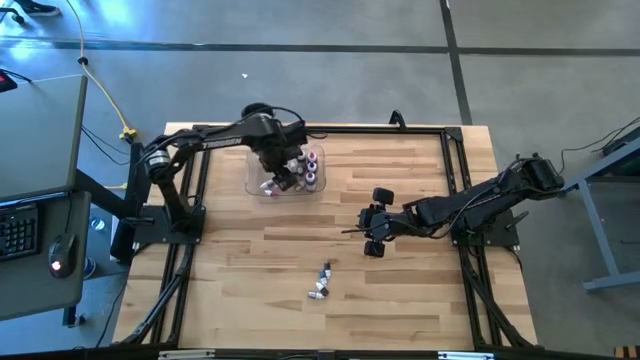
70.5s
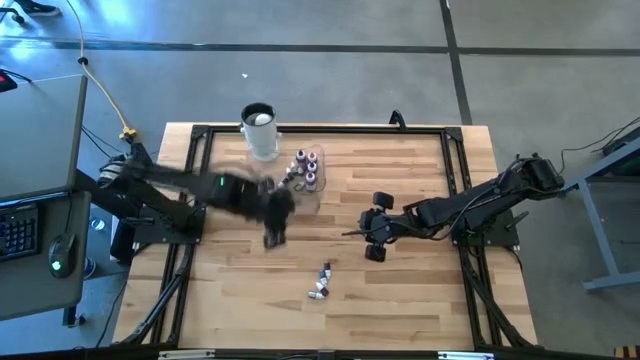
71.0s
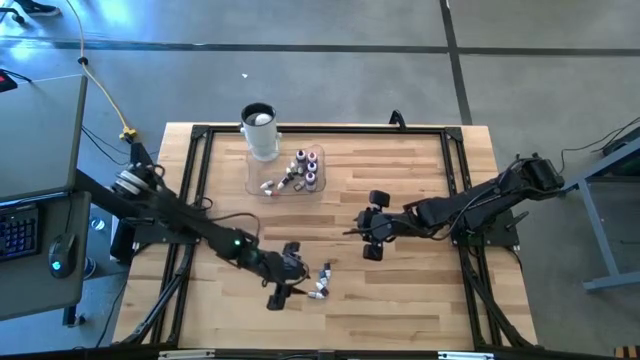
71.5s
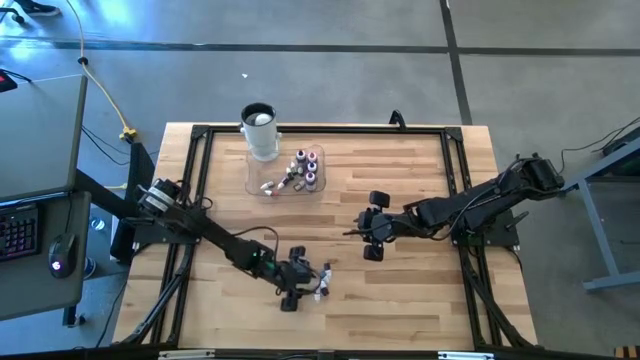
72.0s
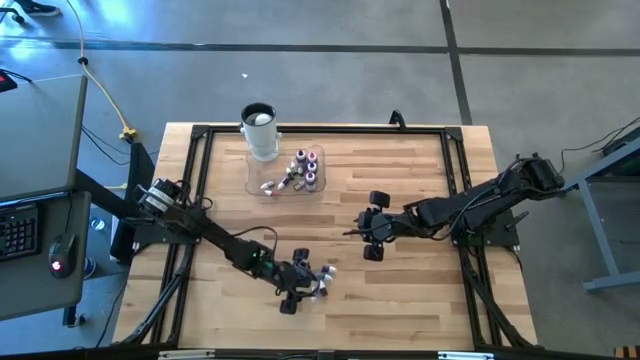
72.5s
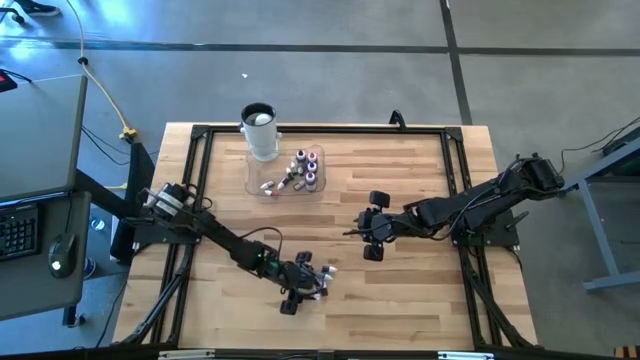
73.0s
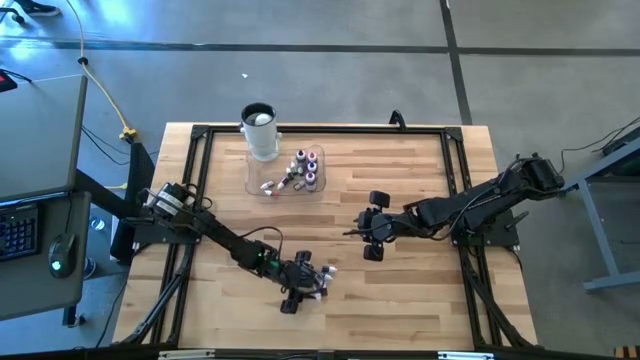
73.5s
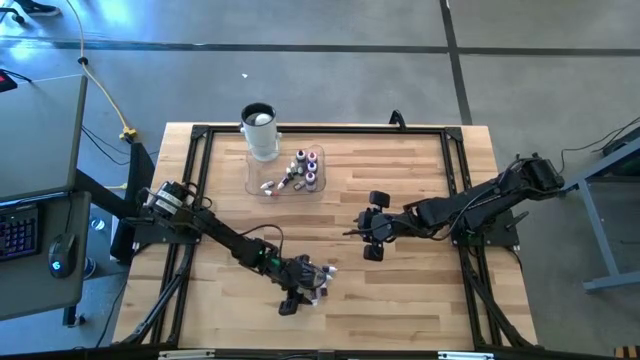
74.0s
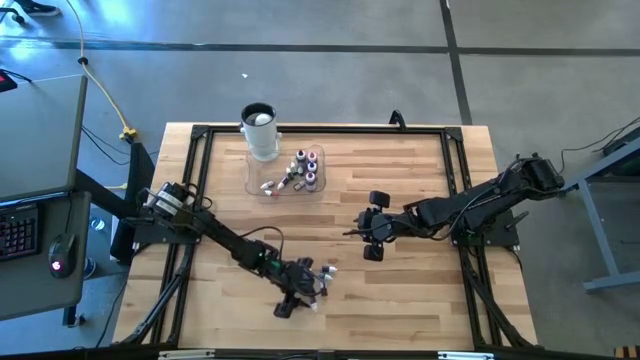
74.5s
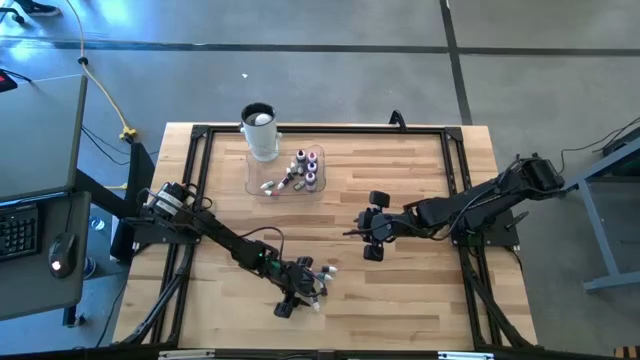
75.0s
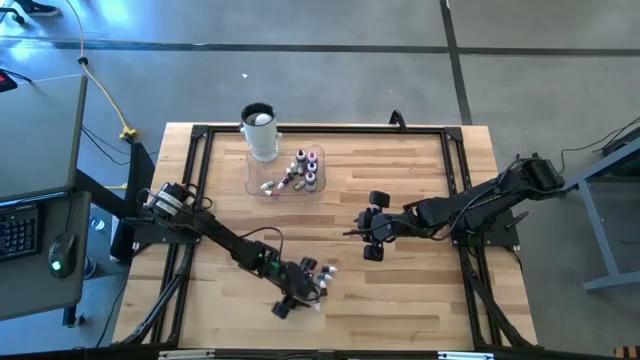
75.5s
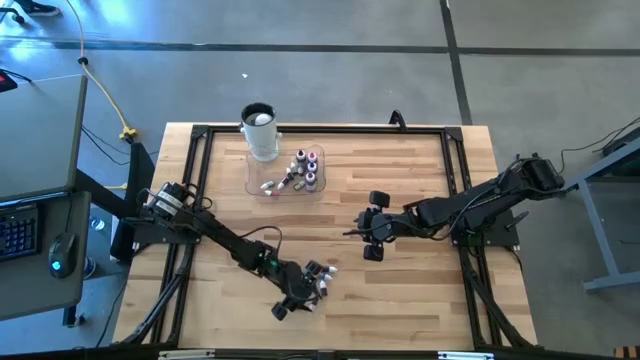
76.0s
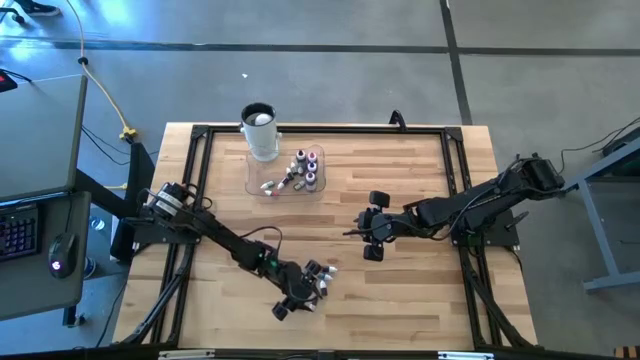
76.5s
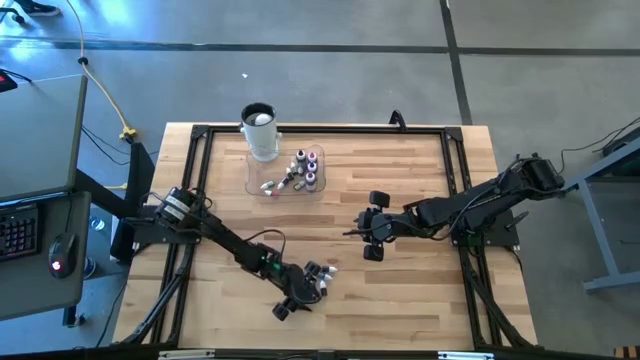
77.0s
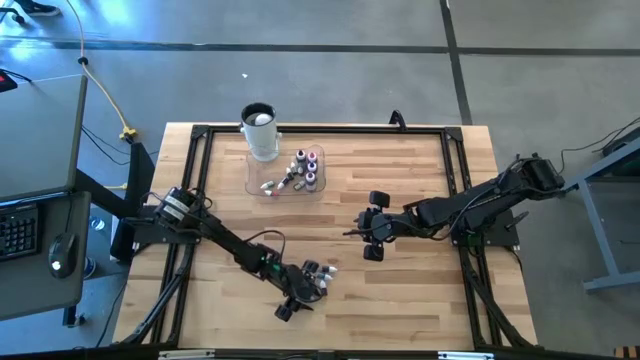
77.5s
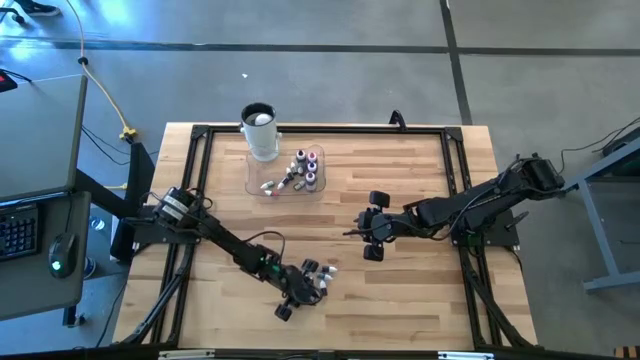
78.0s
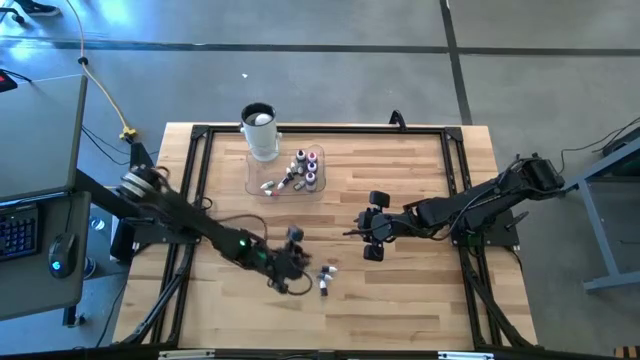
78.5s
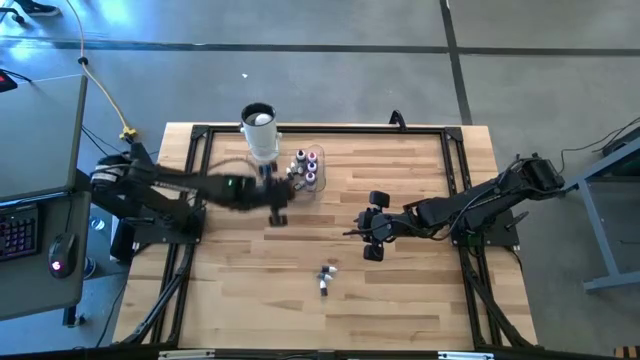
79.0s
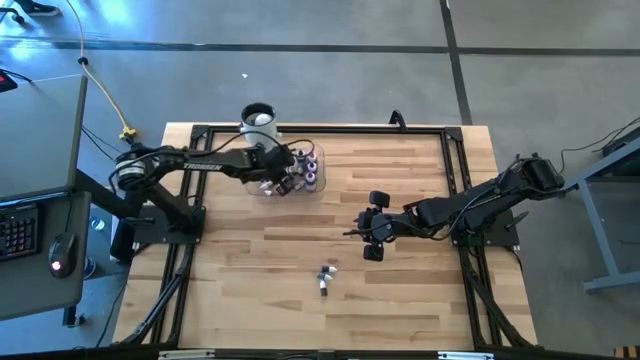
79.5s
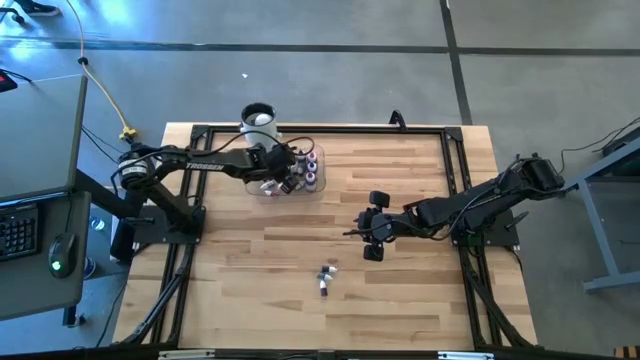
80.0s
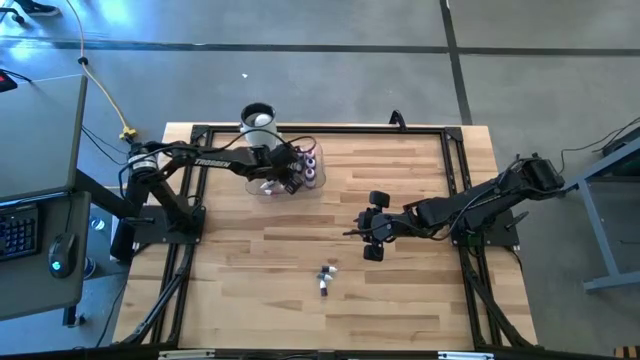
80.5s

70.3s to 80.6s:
Task: Pick & Place food coloring
Put the small purple food coloring bottle into the transparent bin

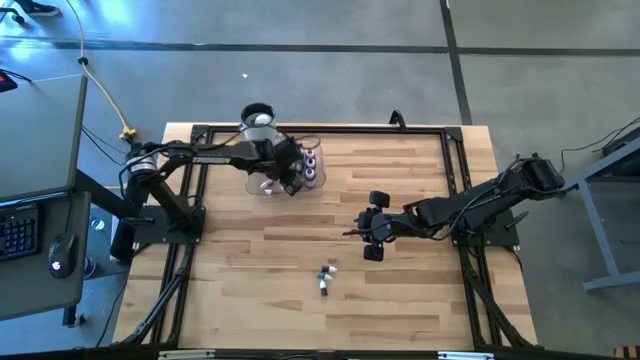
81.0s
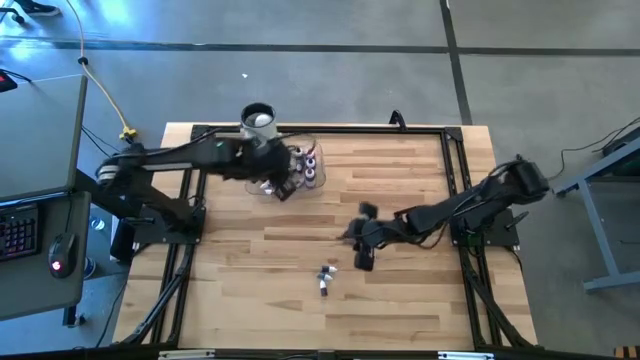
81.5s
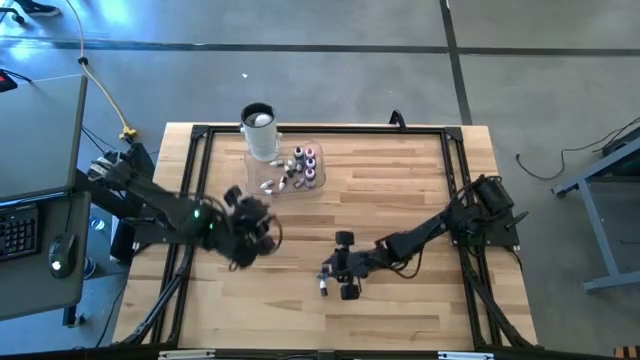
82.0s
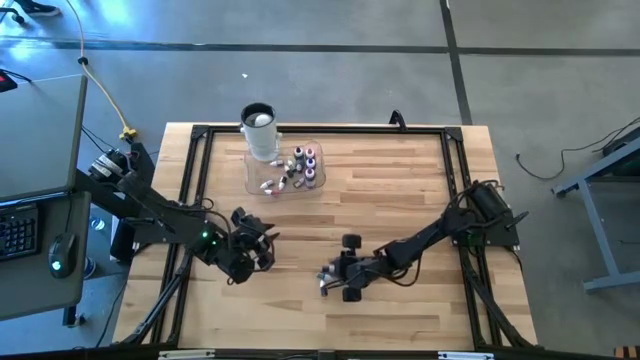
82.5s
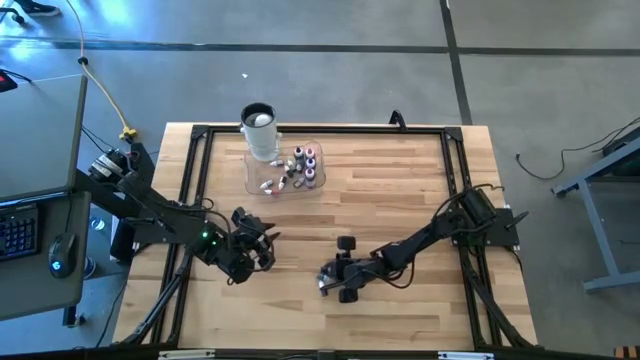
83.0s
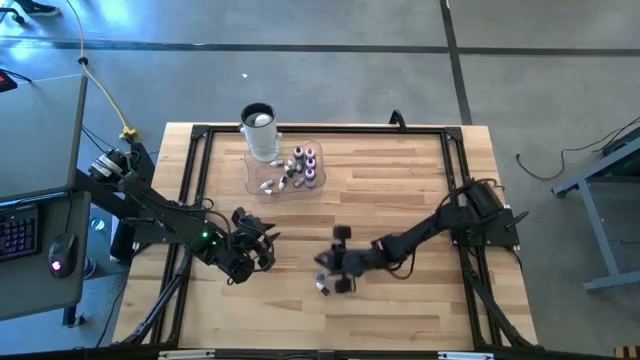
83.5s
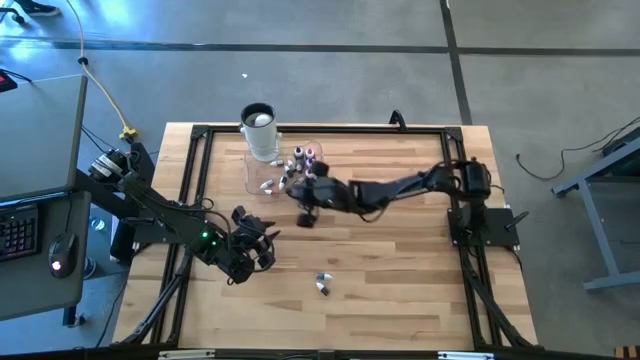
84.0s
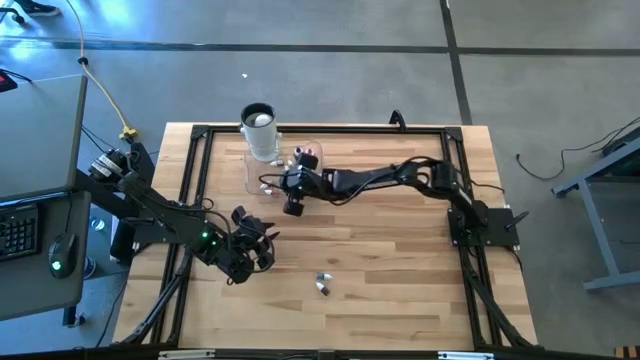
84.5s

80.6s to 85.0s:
Put the small purple food coloring bottle into the transparent bin

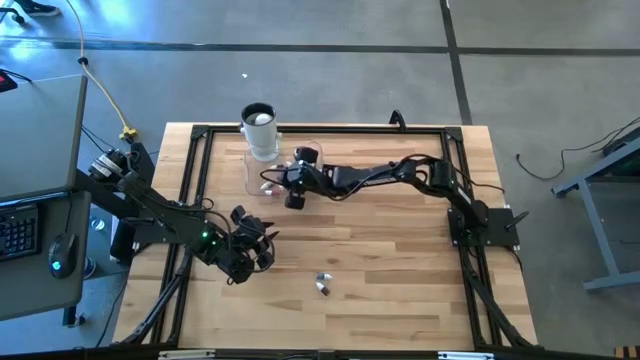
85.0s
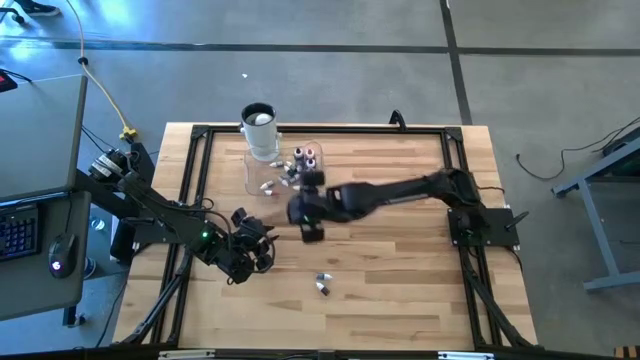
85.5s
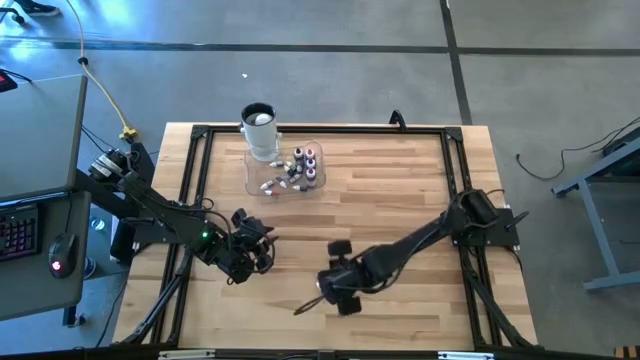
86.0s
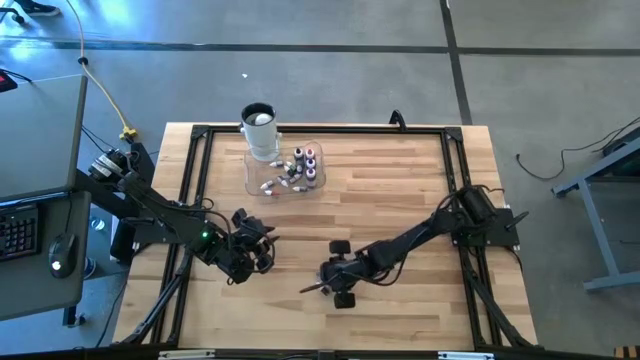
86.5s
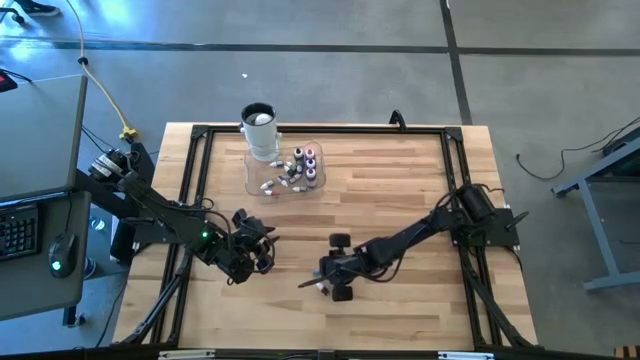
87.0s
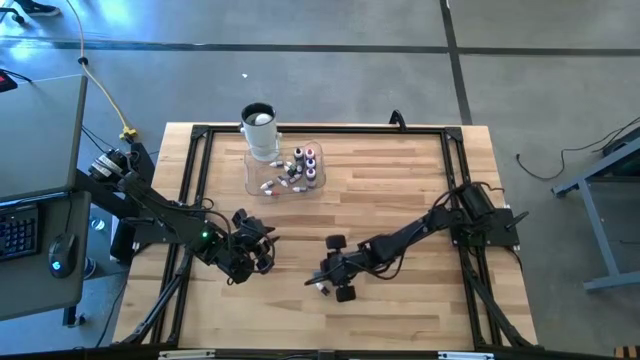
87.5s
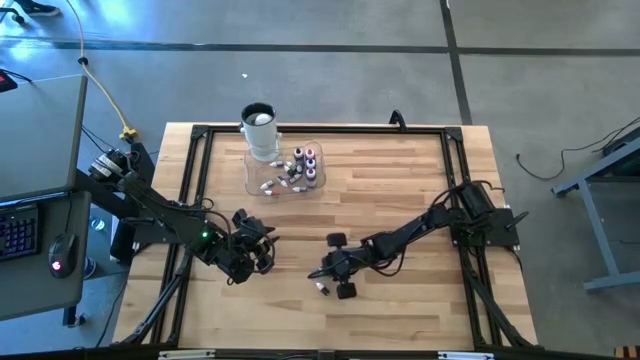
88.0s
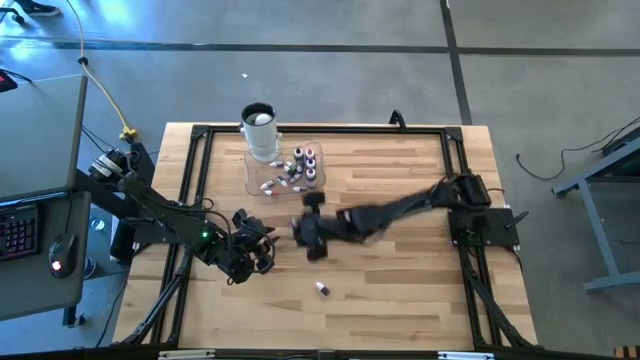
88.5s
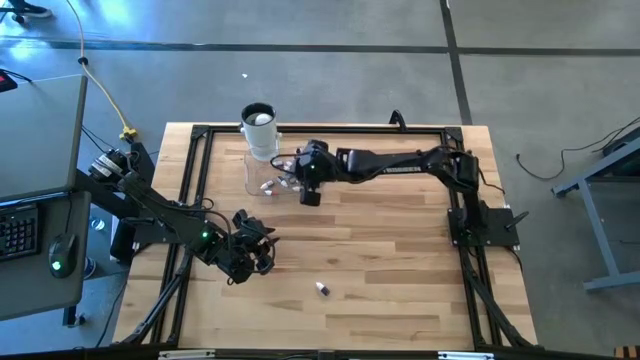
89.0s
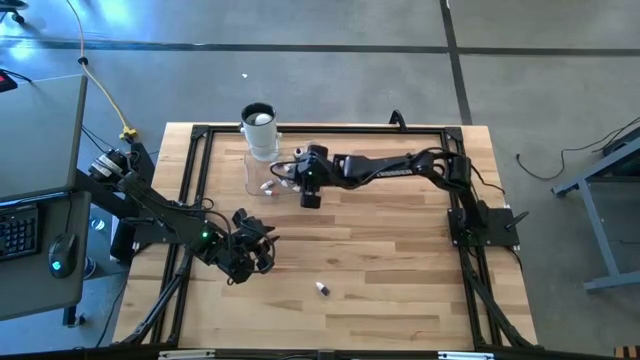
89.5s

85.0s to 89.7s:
Put the small blue food coloring bottle into the transparent bin

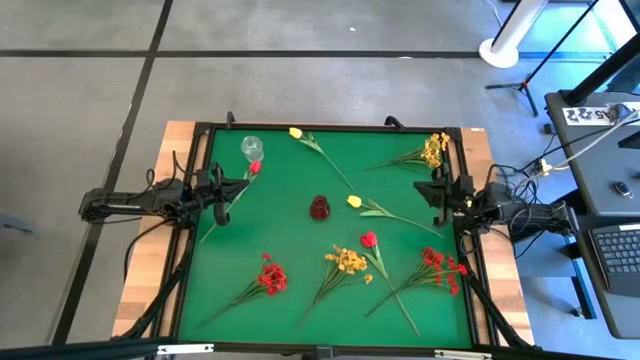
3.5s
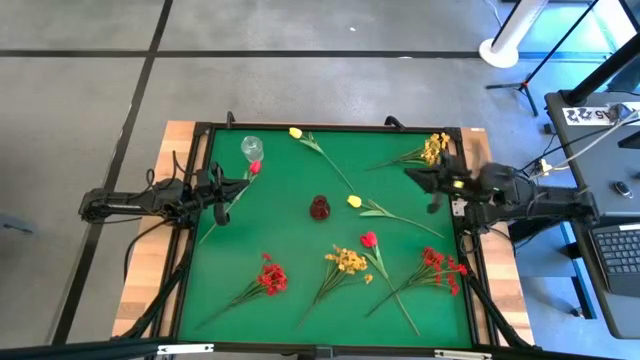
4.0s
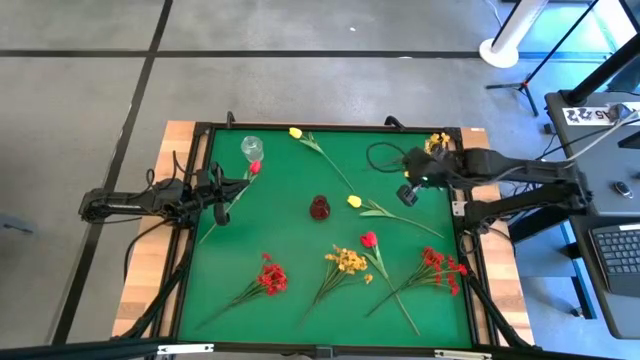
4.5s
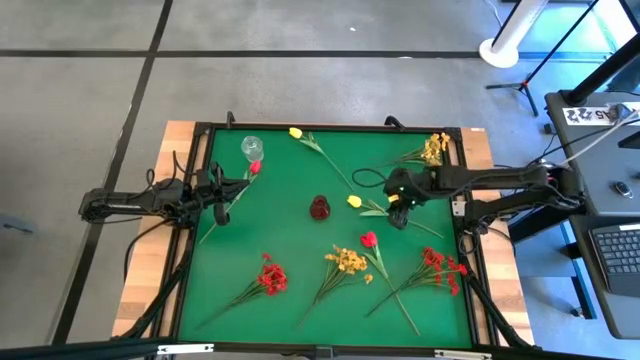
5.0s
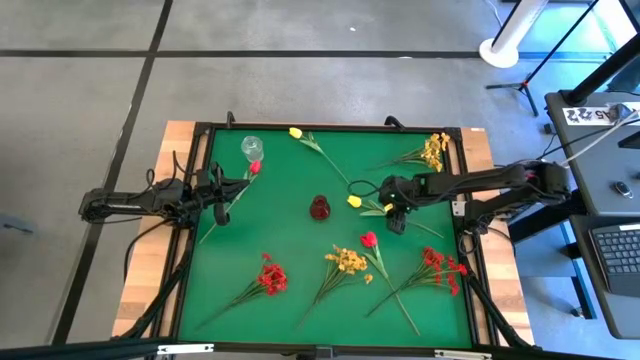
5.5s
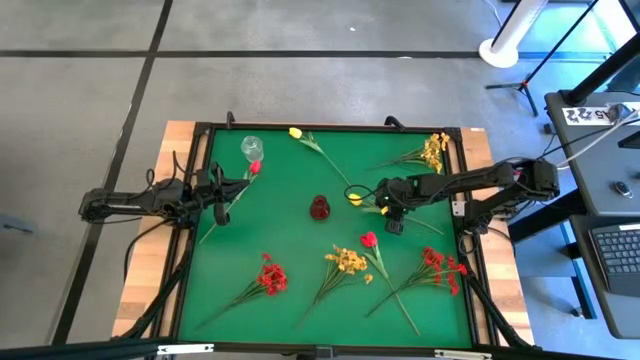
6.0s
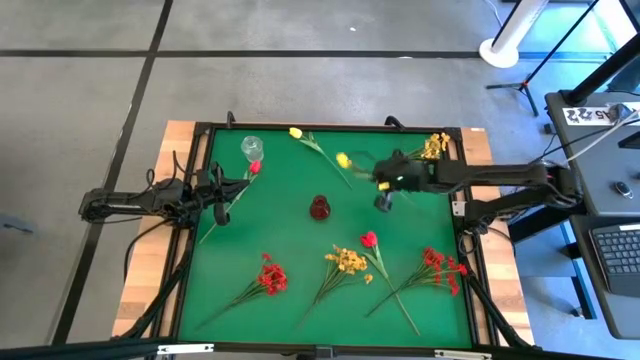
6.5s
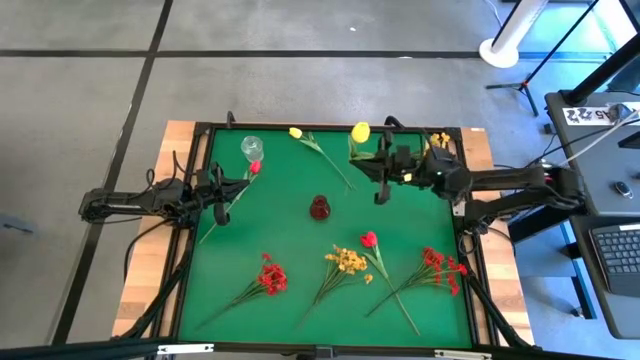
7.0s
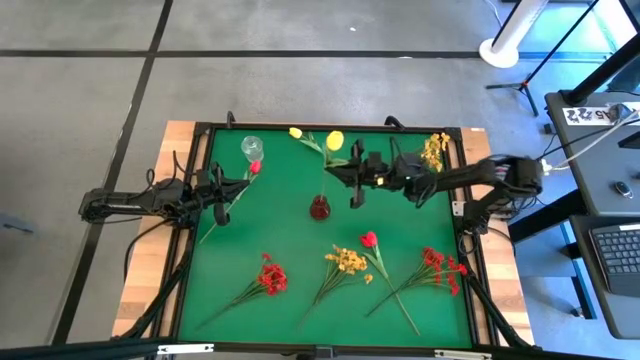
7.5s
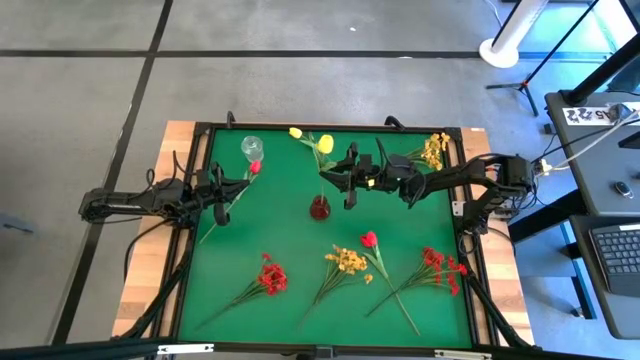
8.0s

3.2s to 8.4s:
Task: Sort flowers into vase by color
Put the bottom yellow tulip into the red flower vase
